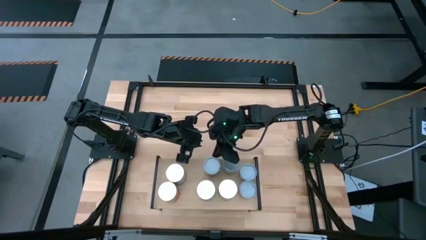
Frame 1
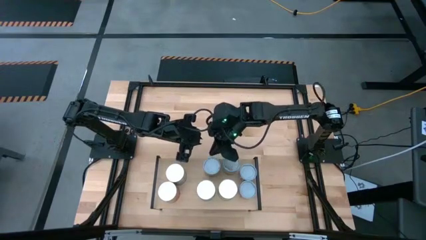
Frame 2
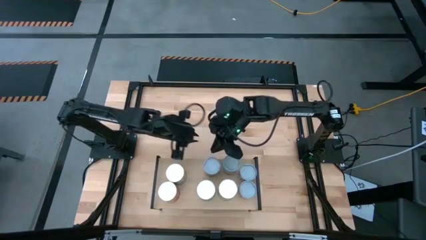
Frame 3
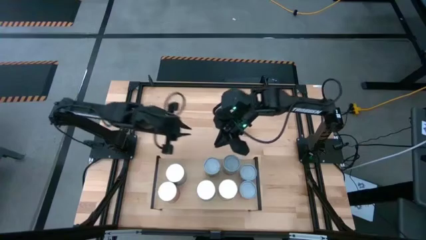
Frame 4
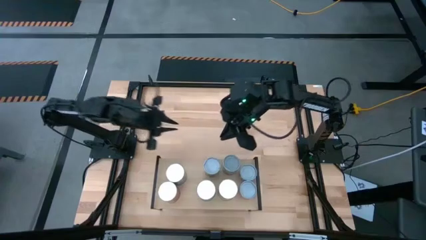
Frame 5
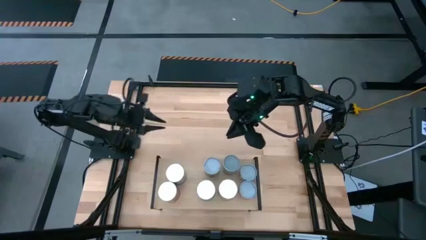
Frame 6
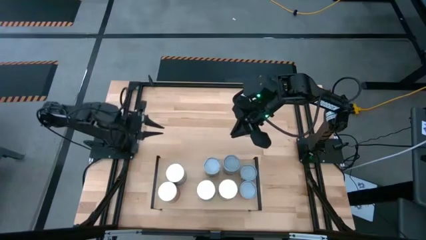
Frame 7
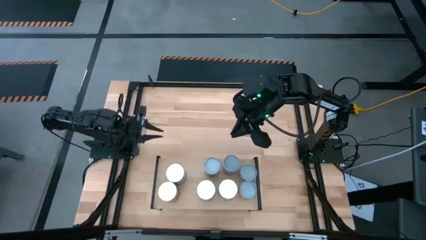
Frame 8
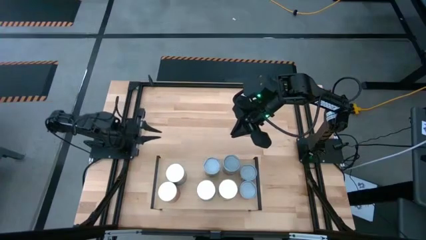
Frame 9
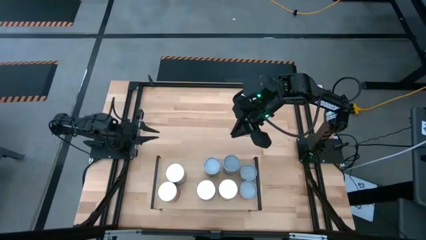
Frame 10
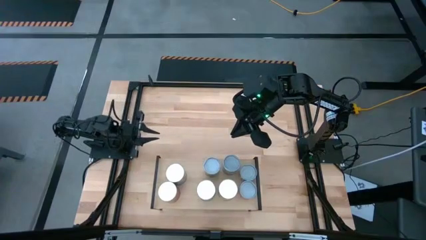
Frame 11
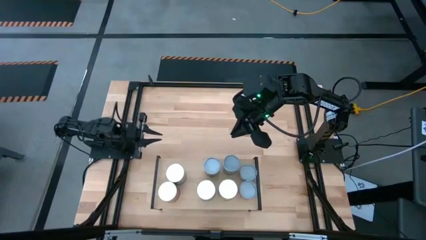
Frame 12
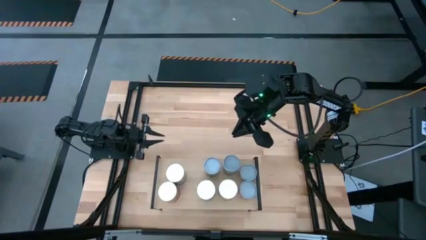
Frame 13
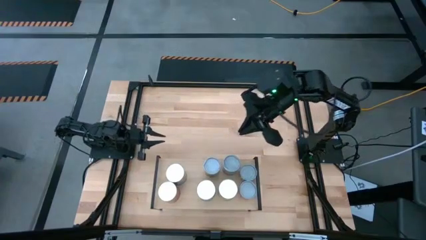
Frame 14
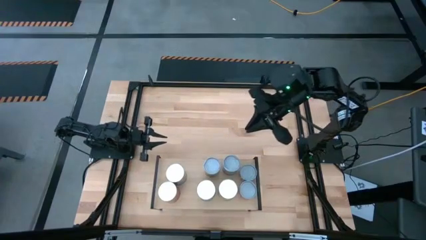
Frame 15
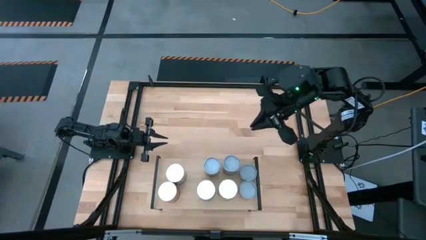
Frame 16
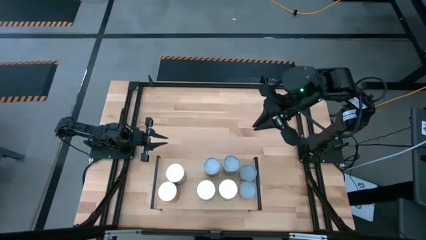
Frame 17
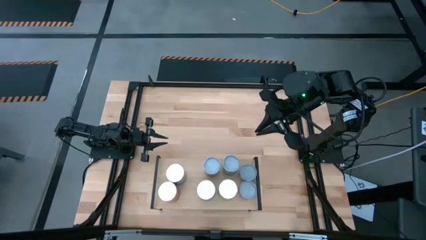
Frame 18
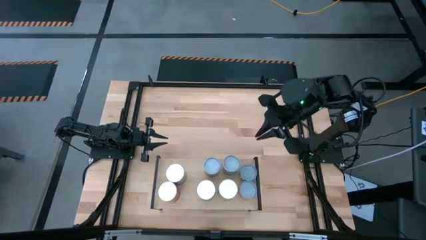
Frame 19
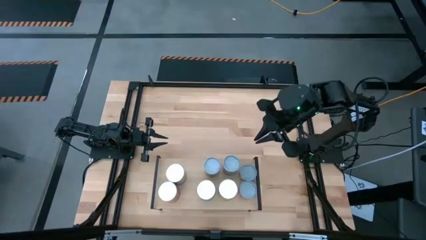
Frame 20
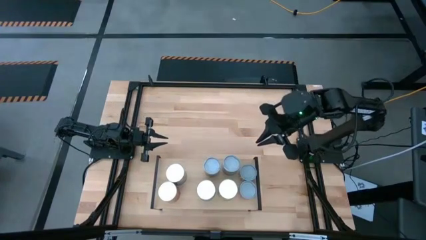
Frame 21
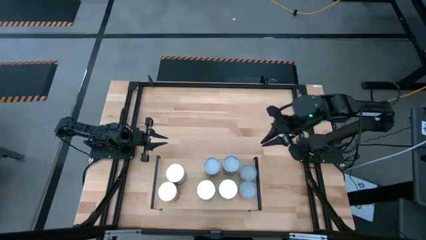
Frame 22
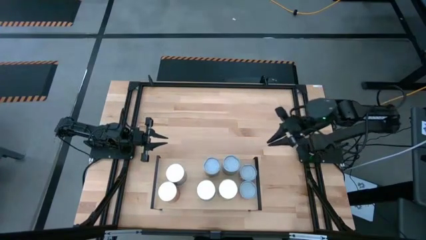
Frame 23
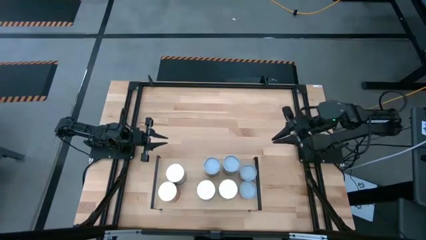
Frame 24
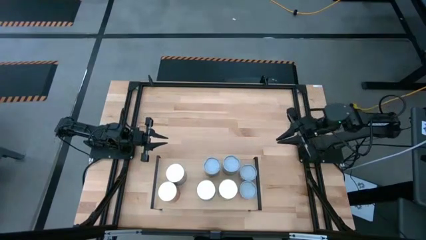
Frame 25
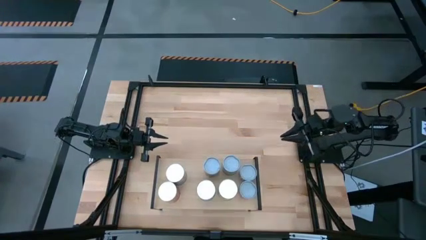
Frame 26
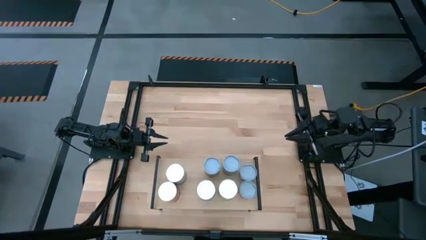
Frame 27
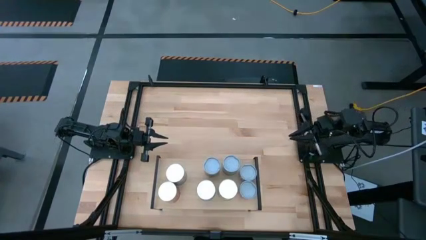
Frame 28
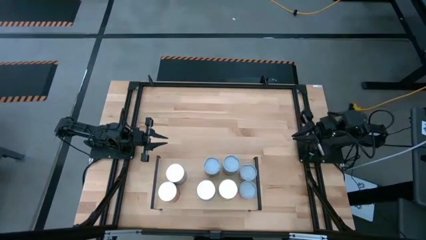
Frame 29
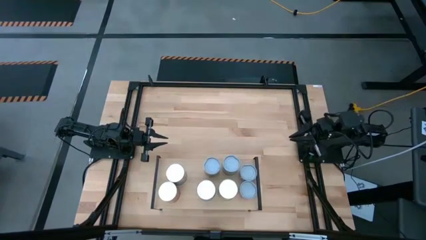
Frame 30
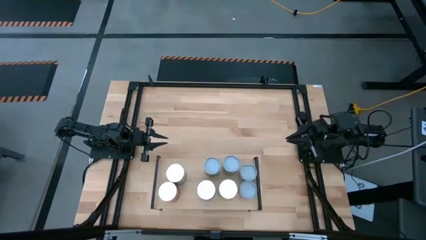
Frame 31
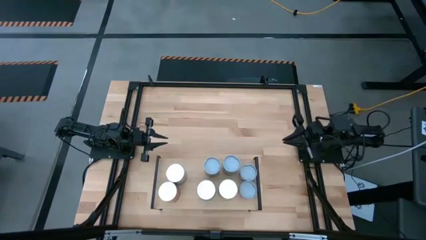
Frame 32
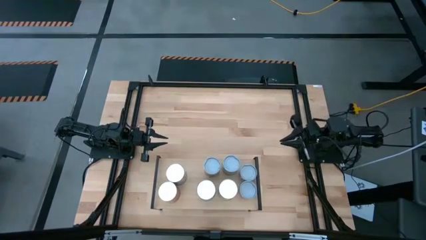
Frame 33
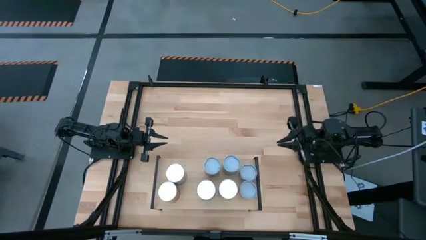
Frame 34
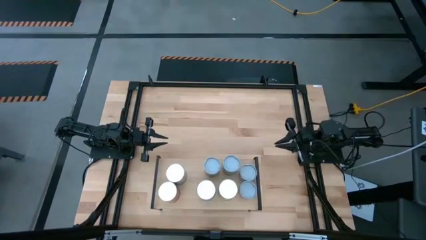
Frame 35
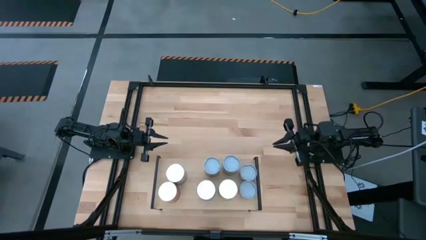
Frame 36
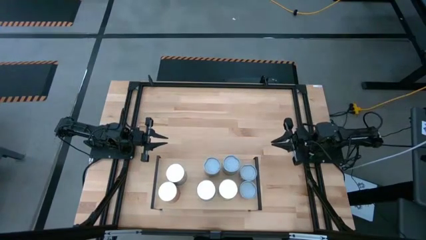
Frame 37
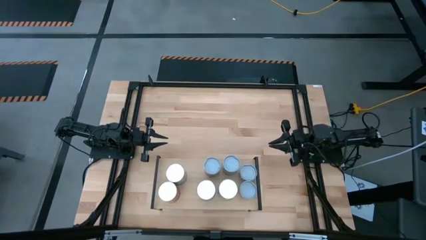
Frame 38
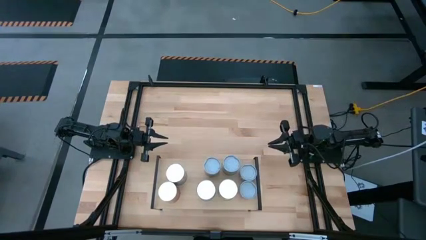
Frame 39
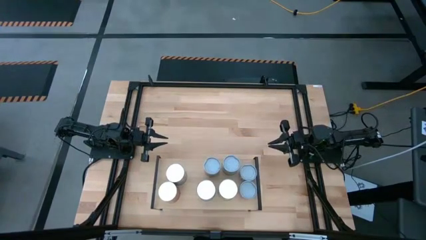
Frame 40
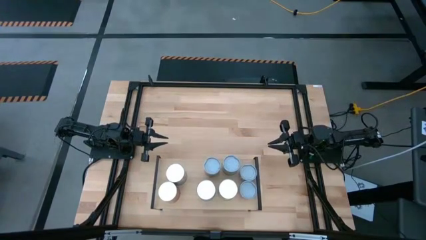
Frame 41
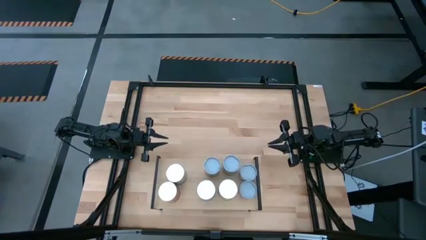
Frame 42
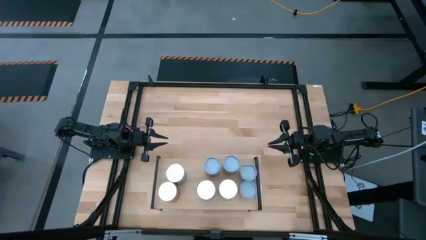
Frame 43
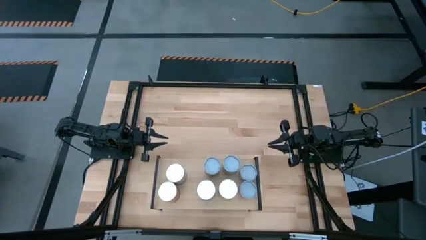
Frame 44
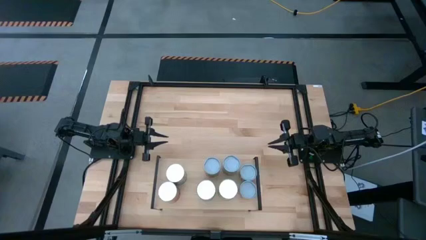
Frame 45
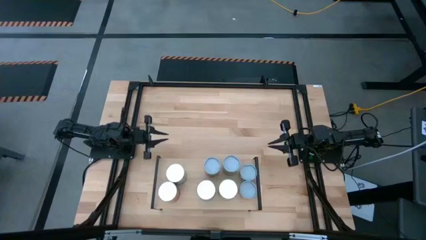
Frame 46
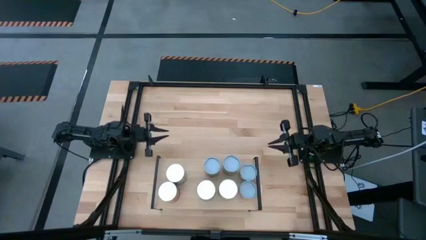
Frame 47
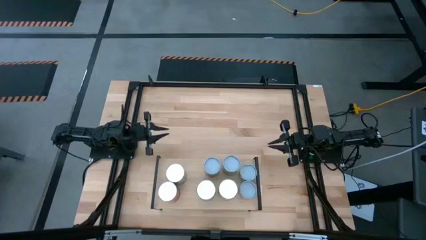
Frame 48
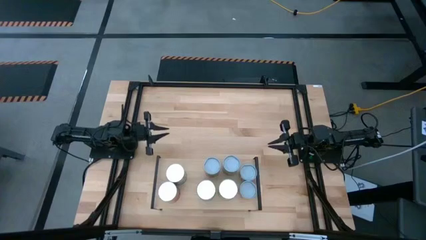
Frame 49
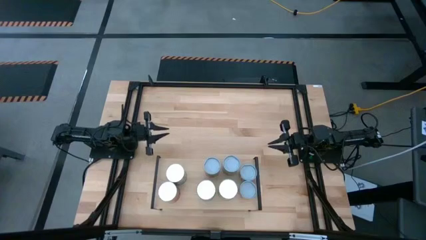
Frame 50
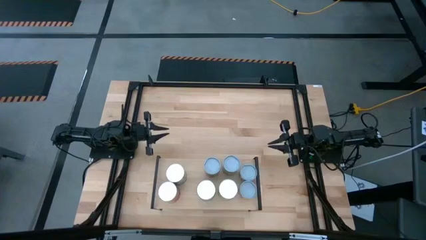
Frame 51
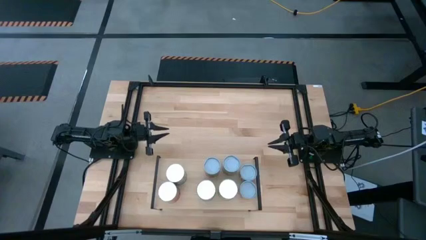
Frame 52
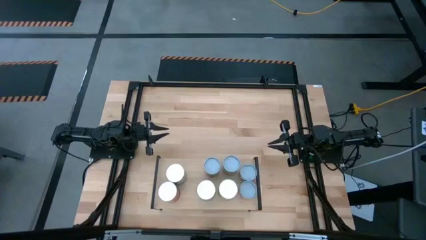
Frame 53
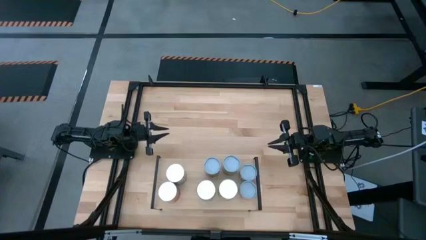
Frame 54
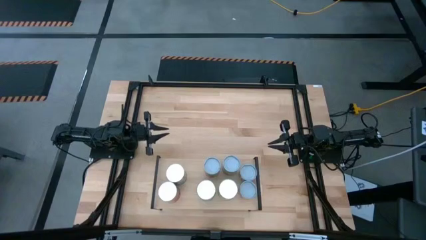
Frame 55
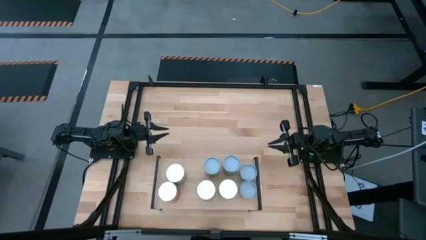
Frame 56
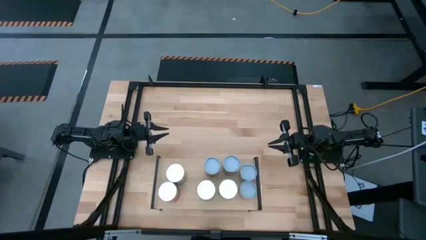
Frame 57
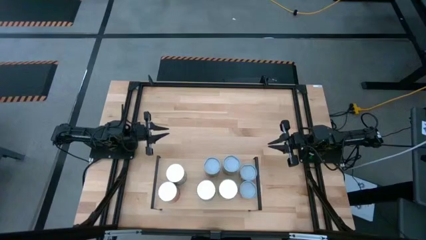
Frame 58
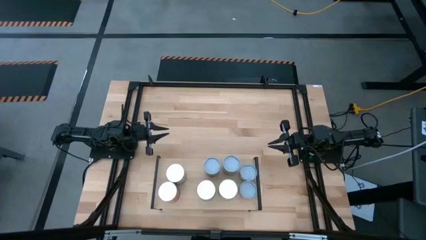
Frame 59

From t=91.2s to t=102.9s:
Task: Pick and place cans onto a shelf
Return to Home Position
